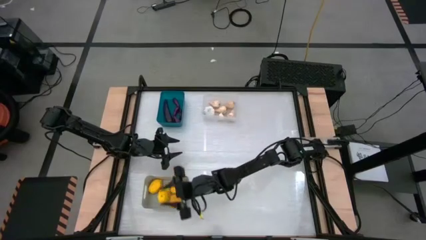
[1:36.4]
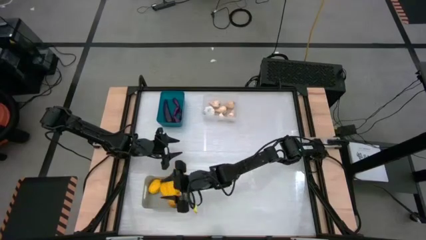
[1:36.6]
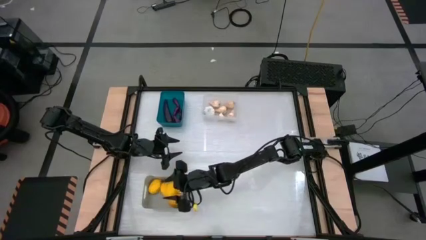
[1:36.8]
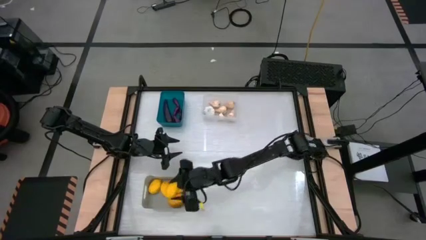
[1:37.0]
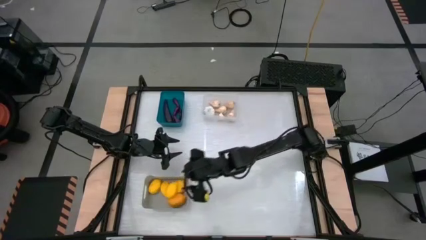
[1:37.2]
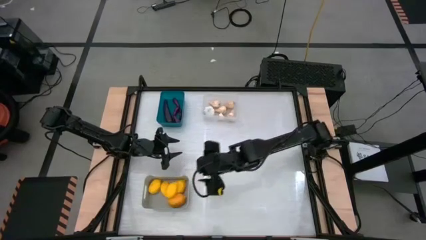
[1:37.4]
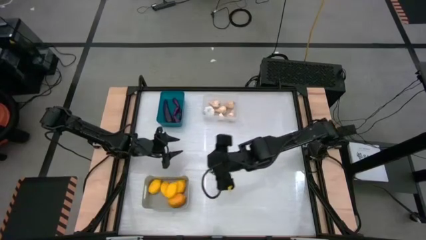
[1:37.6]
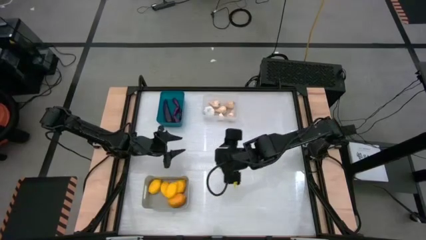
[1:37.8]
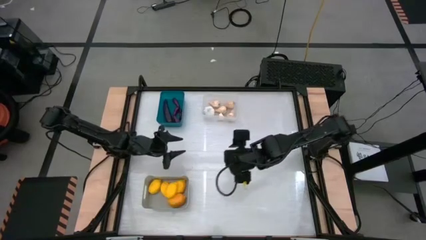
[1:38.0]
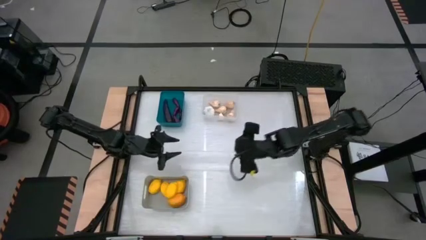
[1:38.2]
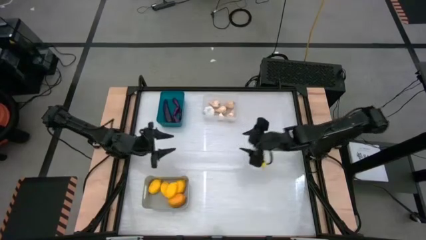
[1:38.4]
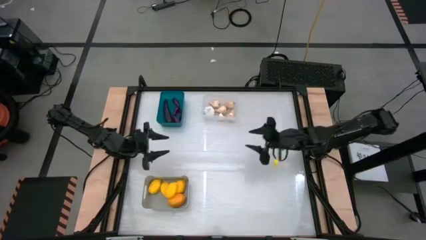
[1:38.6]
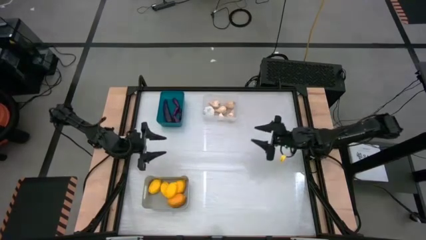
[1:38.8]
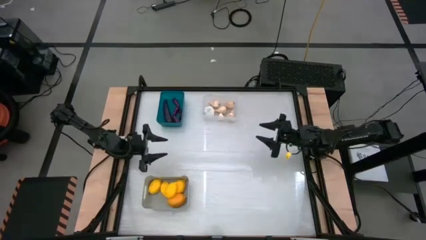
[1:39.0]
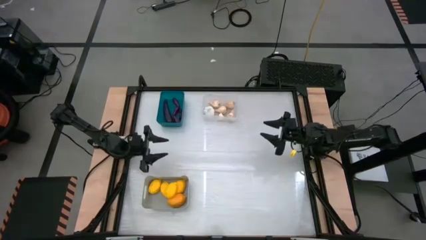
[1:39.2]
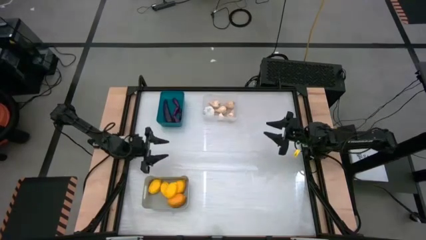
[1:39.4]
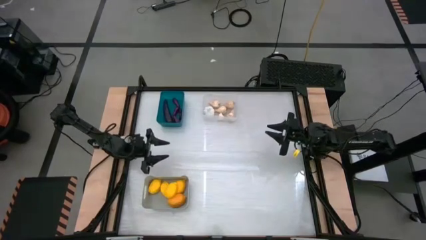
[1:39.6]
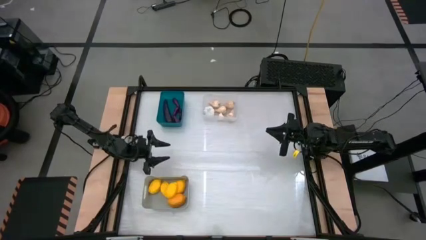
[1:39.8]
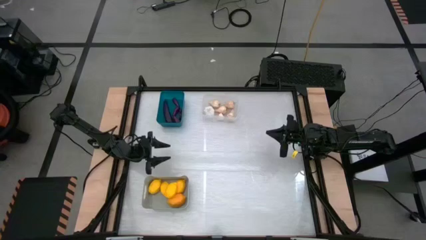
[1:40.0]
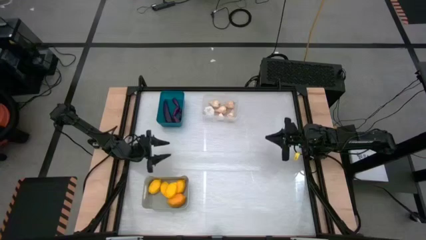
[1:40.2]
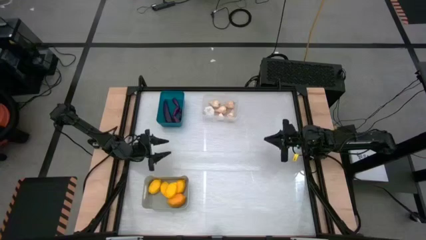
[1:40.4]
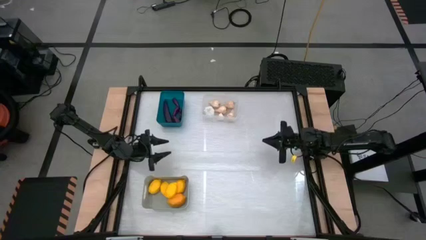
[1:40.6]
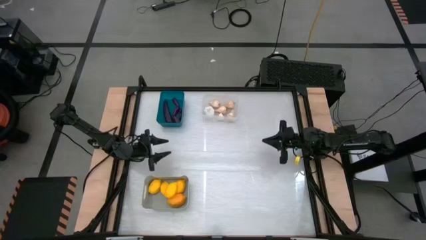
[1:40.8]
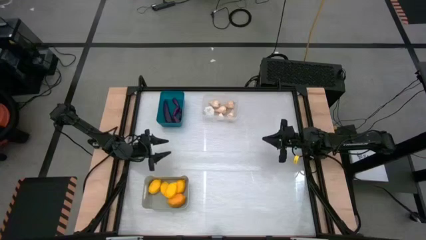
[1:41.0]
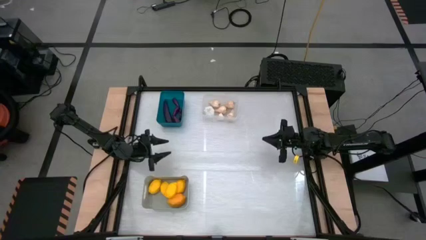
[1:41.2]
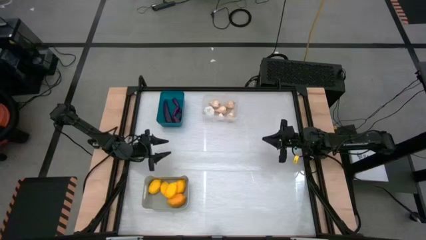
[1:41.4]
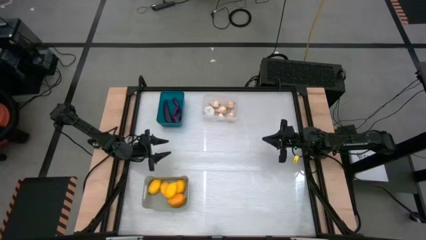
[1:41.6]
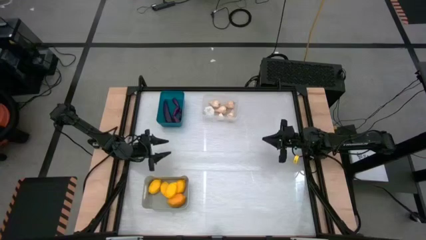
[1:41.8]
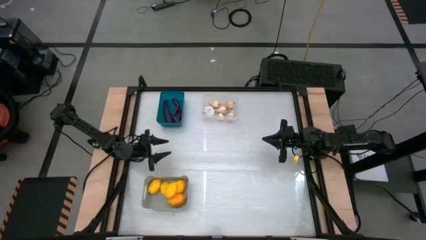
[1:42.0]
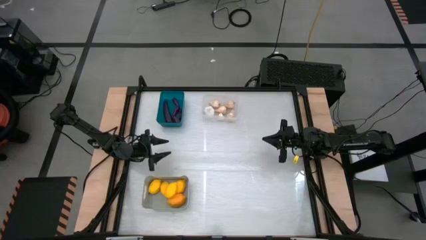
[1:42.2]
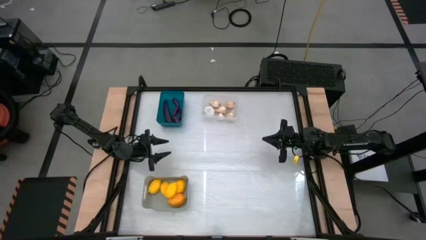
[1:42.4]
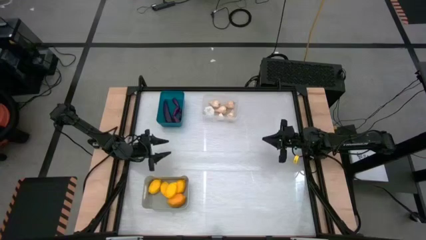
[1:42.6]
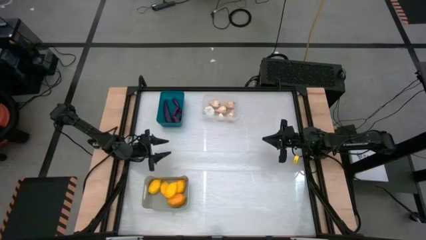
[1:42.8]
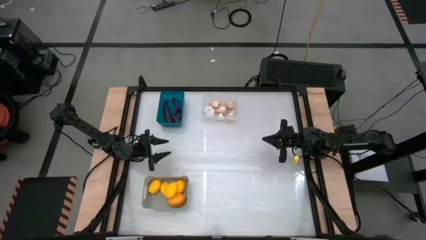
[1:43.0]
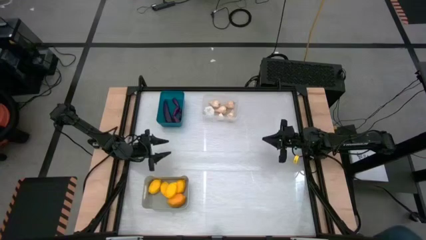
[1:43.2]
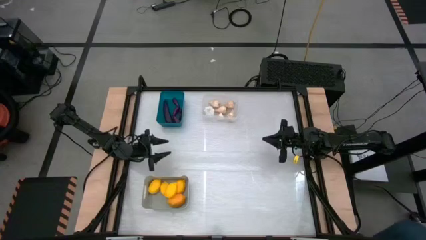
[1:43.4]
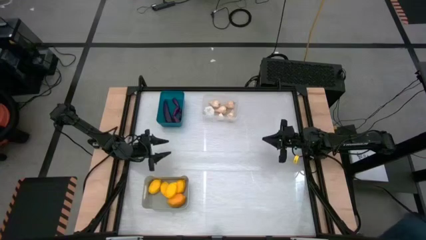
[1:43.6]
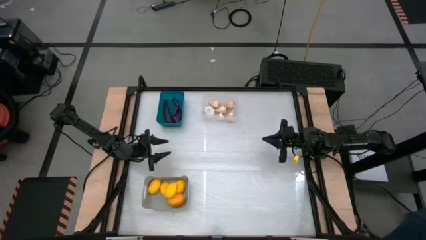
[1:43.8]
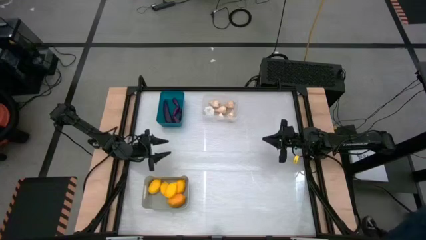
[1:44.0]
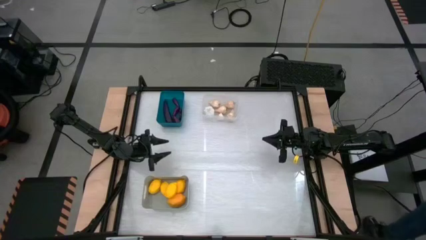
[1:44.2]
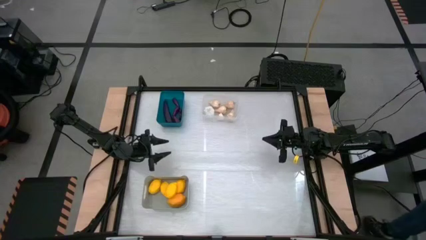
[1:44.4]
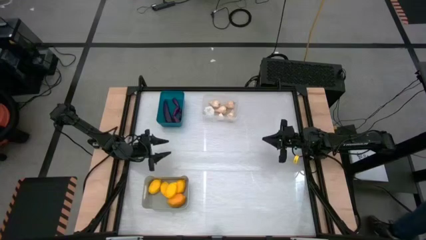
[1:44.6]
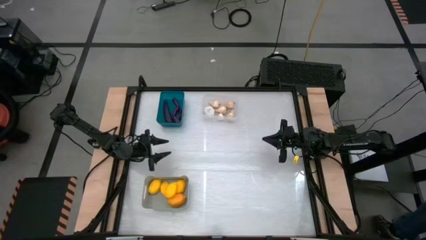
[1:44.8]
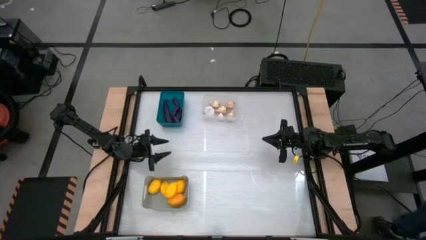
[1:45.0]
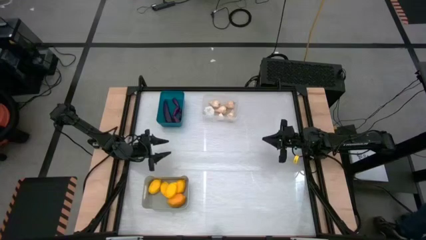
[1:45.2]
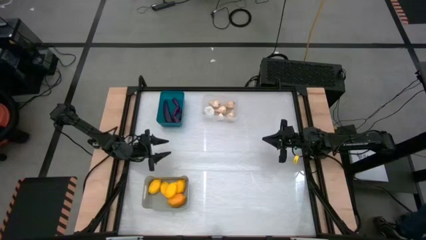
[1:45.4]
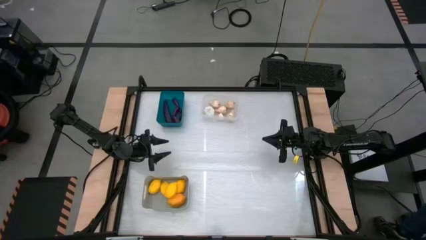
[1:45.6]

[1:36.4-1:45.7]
Task: Sort produce into baskets
Return to Home Position

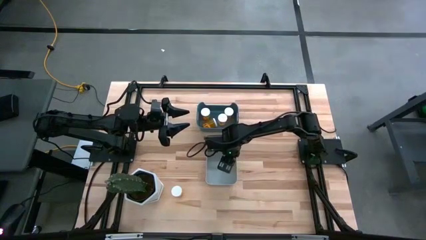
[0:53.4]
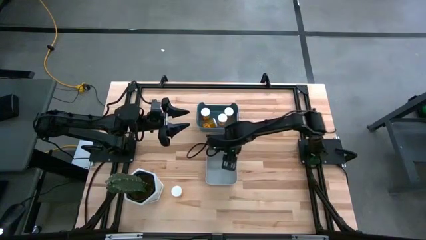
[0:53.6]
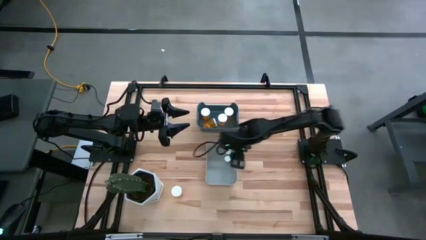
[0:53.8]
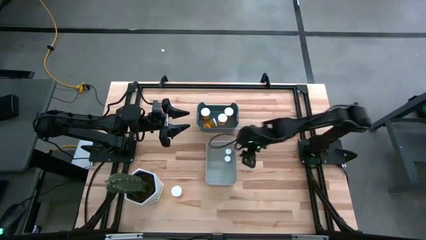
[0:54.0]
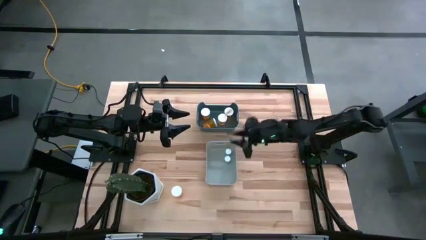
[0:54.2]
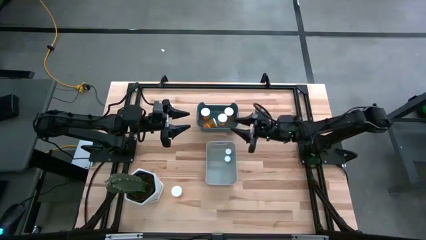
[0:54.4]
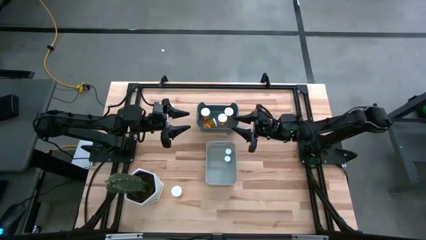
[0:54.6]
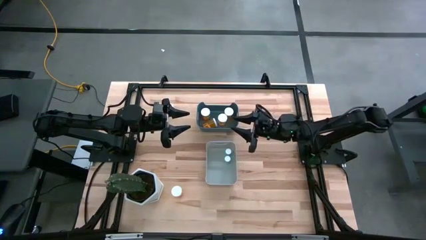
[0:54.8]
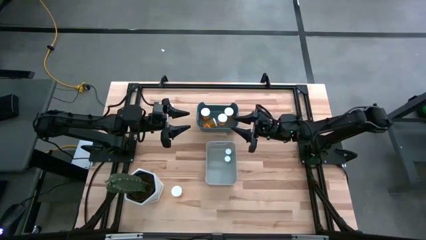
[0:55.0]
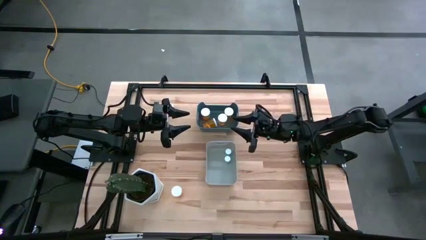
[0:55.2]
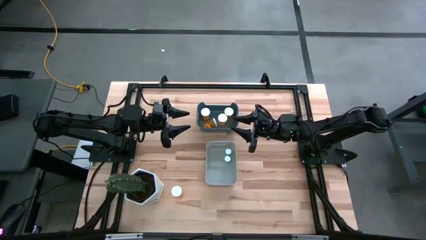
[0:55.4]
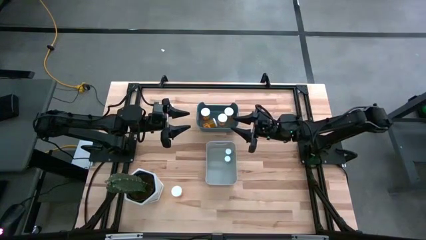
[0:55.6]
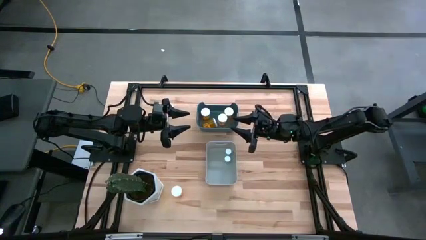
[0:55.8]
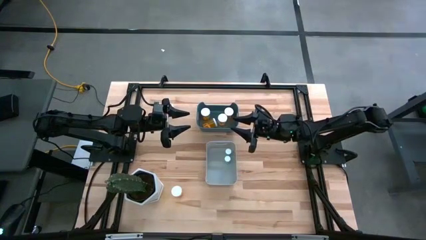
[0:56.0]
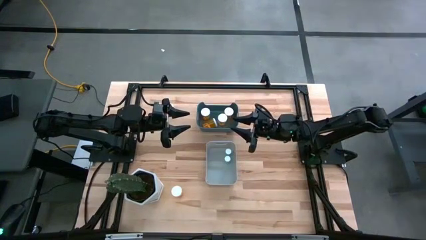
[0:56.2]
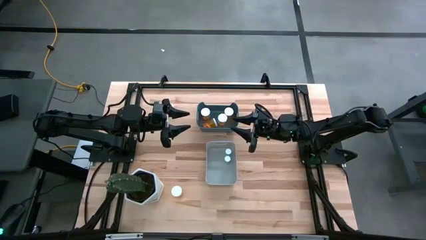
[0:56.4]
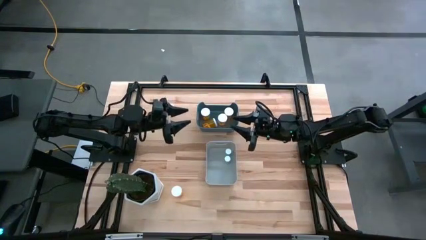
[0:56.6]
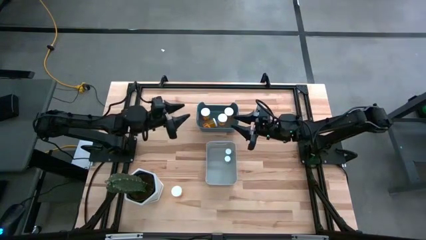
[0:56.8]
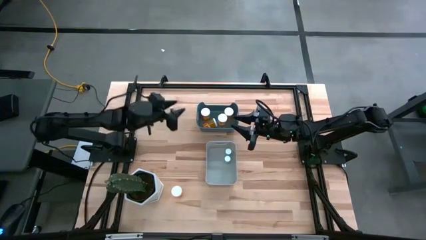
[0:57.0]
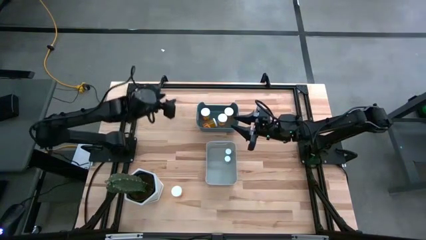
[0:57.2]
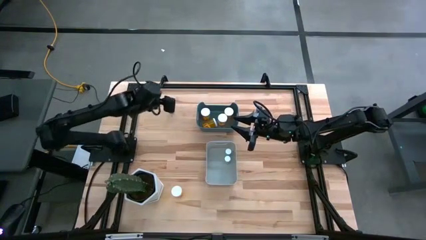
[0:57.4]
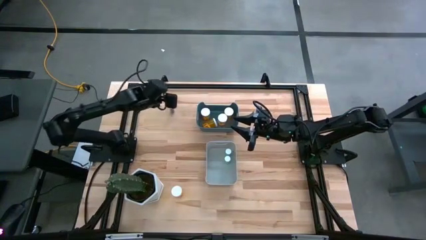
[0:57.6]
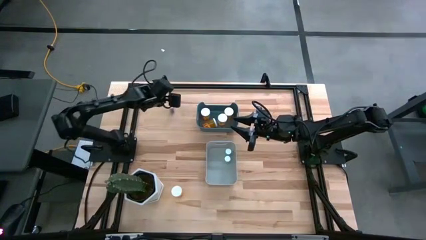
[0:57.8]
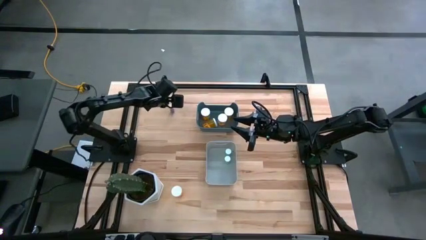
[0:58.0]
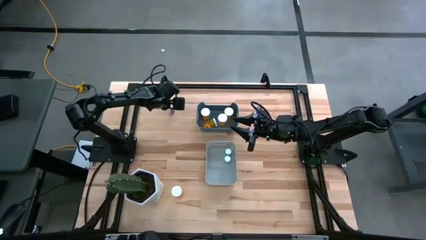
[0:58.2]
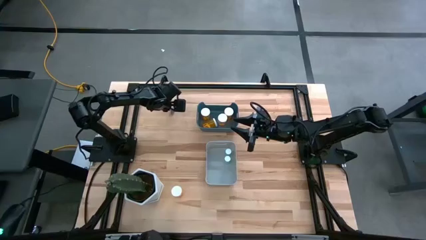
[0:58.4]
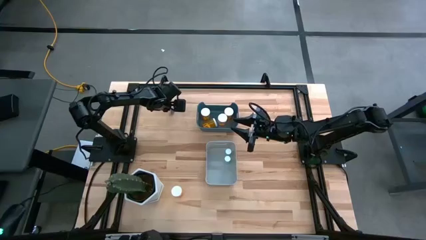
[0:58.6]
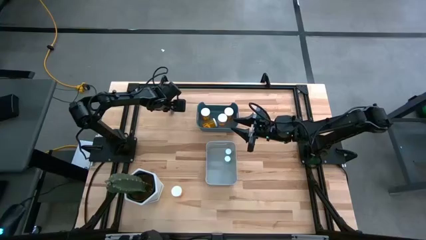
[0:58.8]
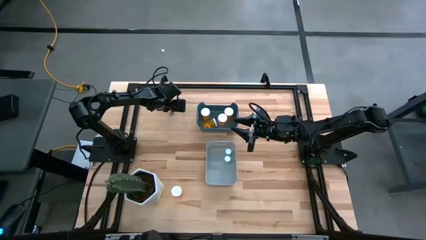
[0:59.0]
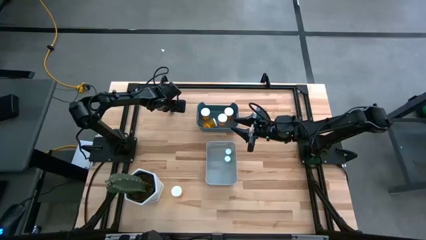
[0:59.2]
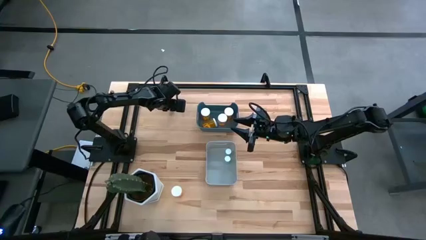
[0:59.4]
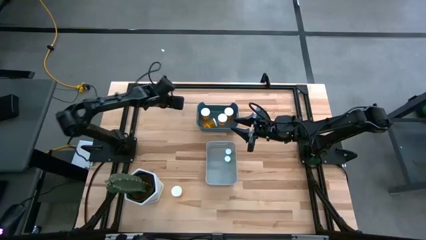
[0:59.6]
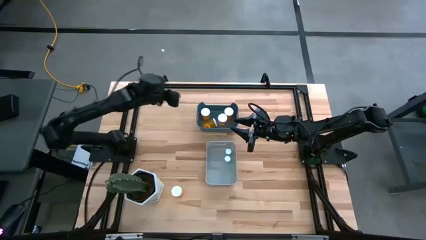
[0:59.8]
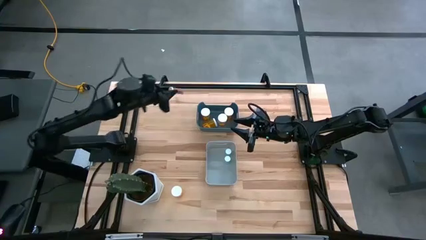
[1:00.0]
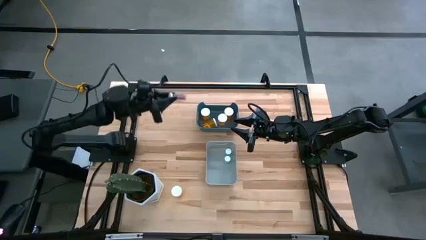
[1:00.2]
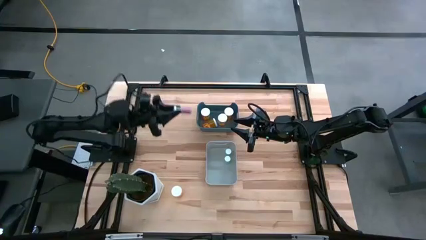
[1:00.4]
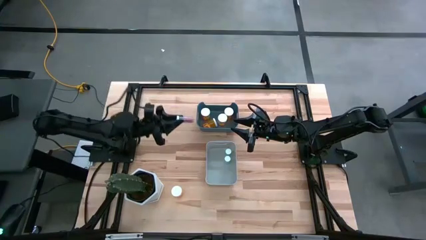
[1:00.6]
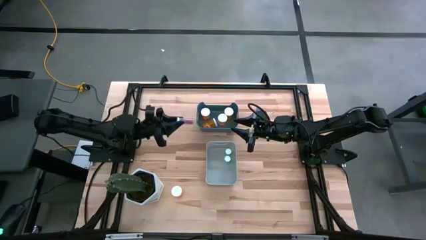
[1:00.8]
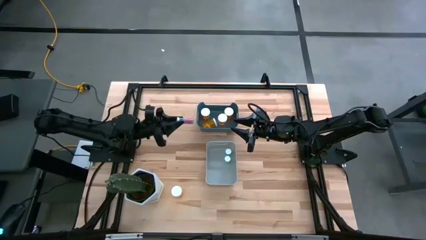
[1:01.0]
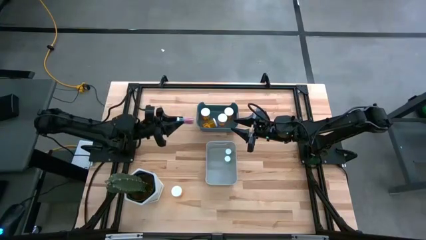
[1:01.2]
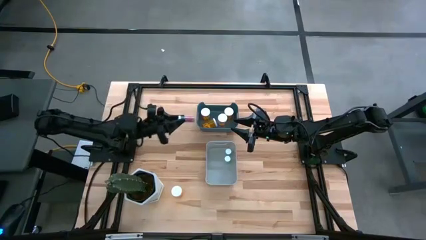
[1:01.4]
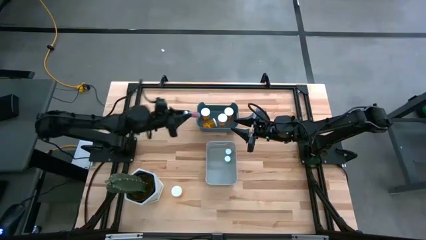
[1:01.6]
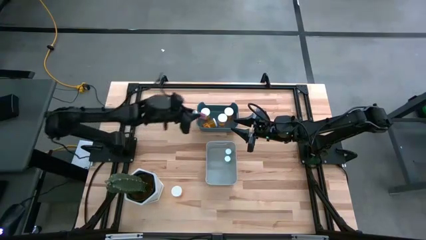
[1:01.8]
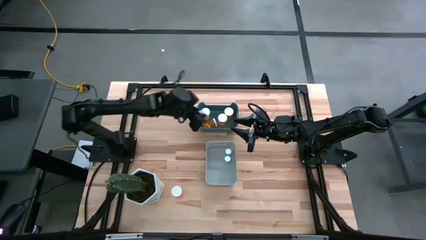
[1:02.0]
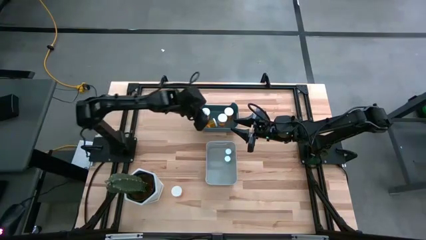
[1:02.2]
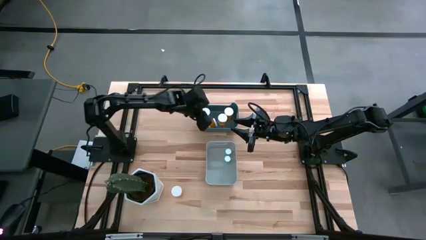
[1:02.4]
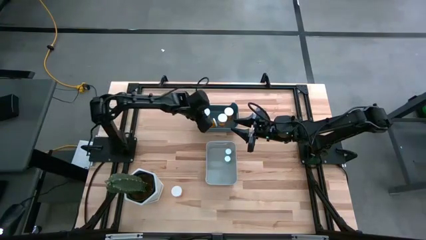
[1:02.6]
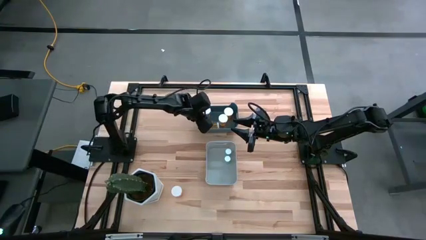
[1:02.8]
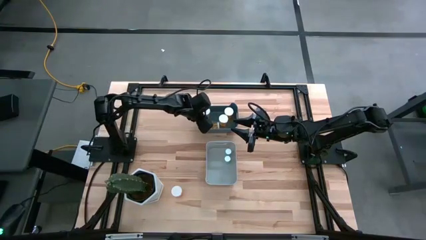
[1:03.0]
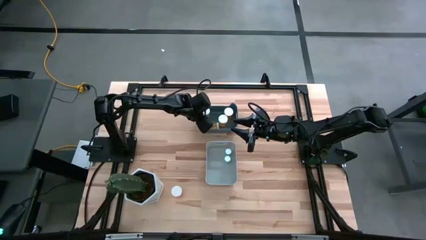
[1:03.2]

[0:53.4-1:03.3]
Task: Pick and place medicine bottles into bin by pill shape (circle, oval)
Put the blue capsule bottle into the blue bin
